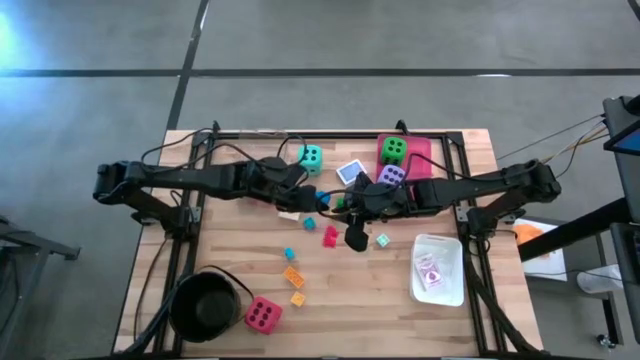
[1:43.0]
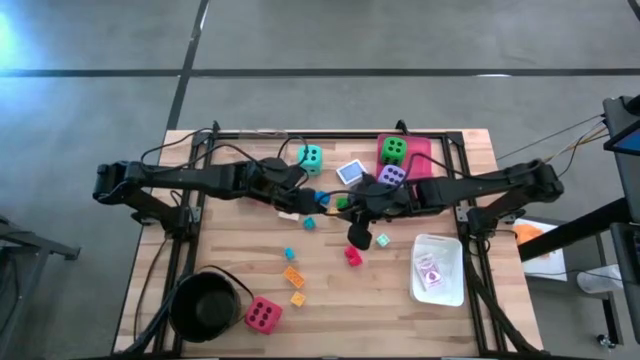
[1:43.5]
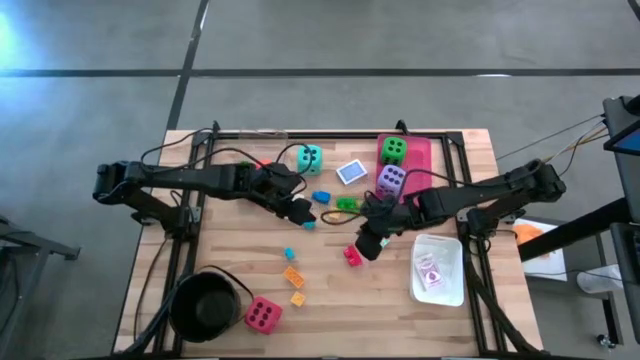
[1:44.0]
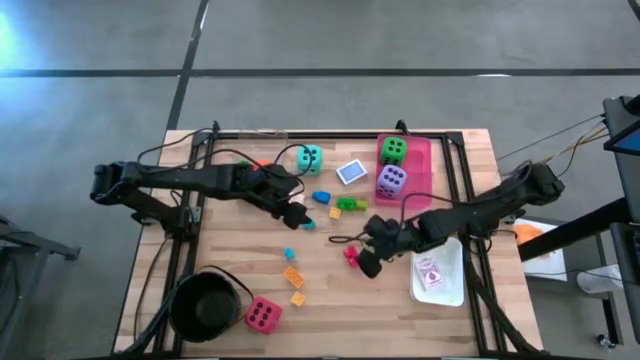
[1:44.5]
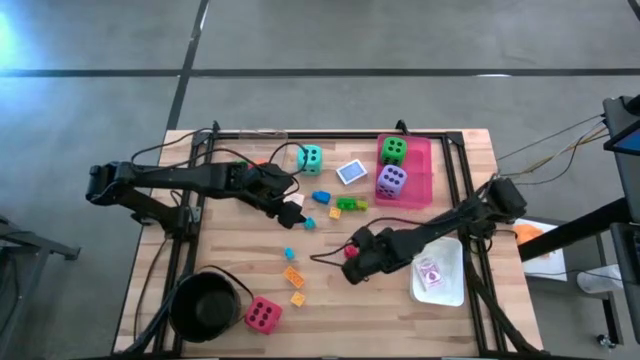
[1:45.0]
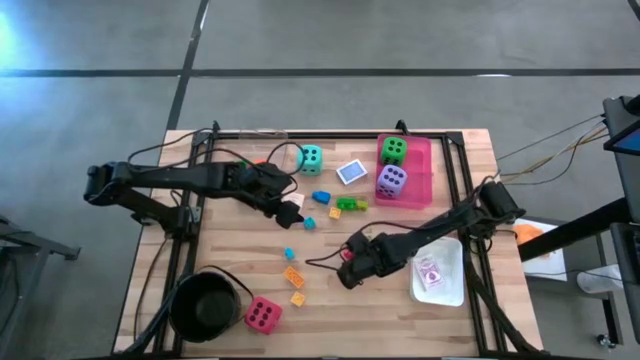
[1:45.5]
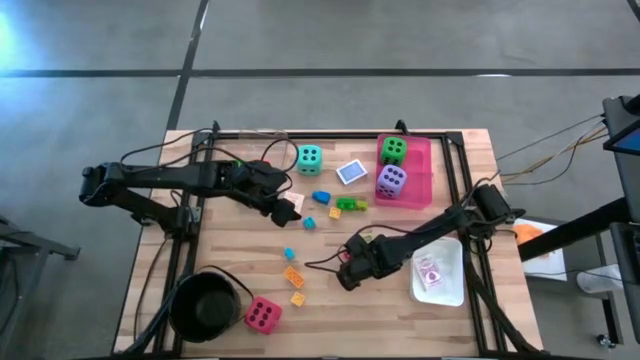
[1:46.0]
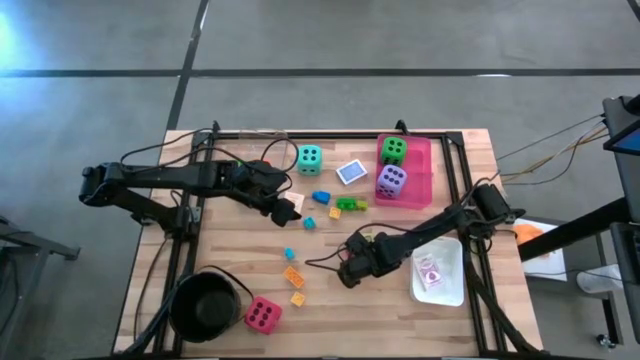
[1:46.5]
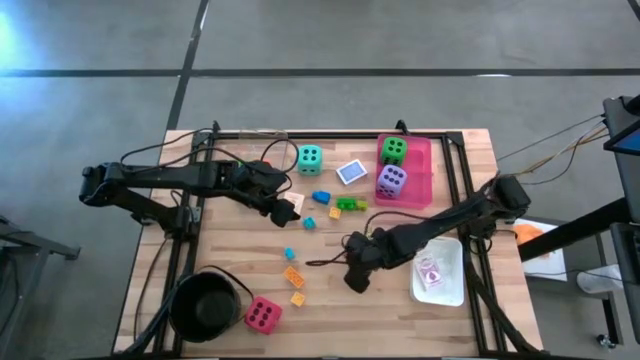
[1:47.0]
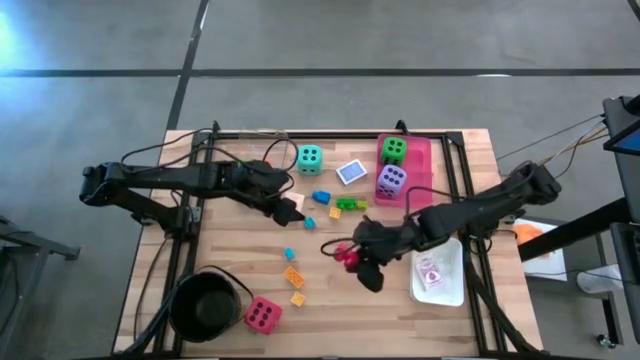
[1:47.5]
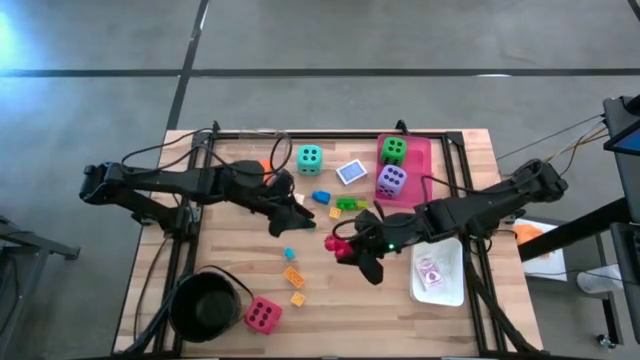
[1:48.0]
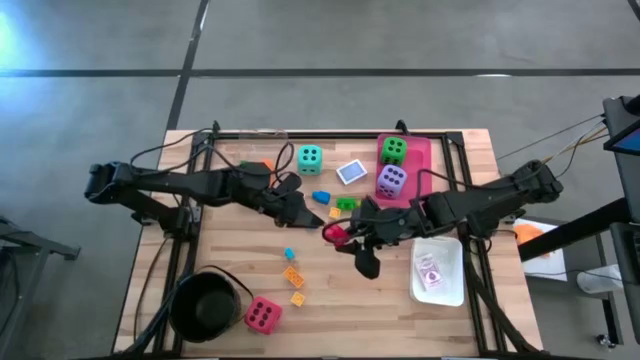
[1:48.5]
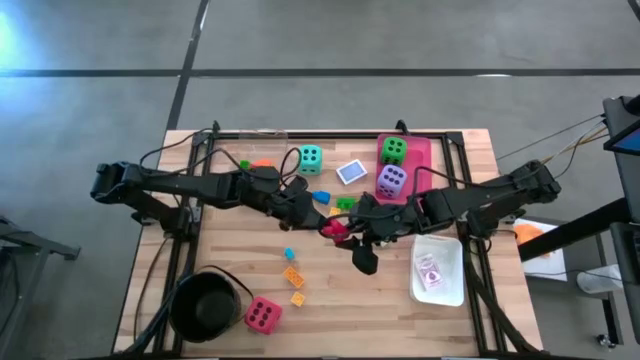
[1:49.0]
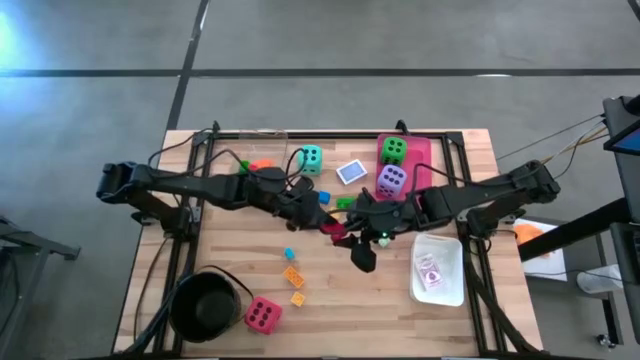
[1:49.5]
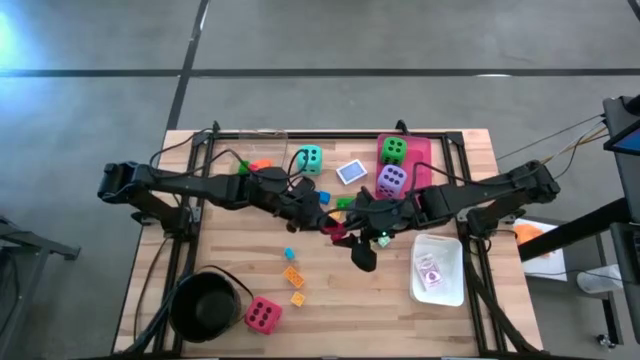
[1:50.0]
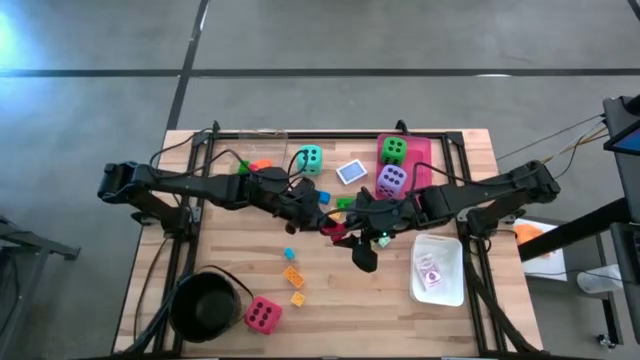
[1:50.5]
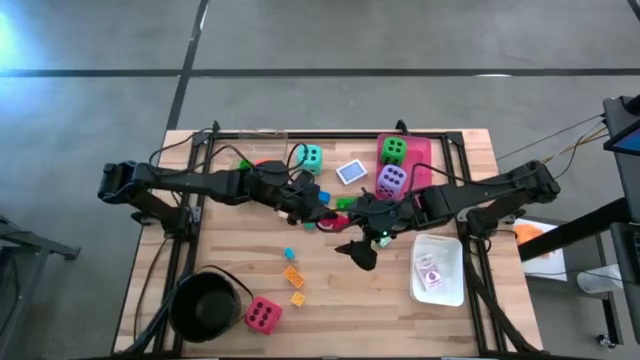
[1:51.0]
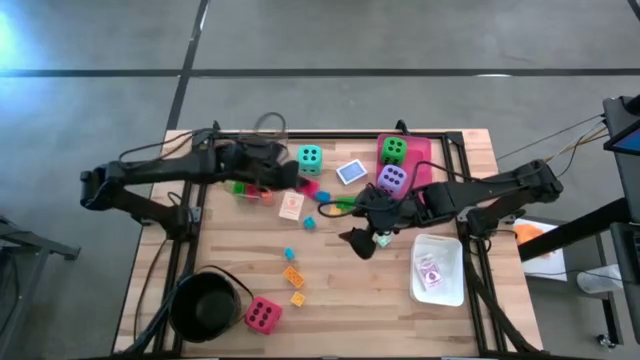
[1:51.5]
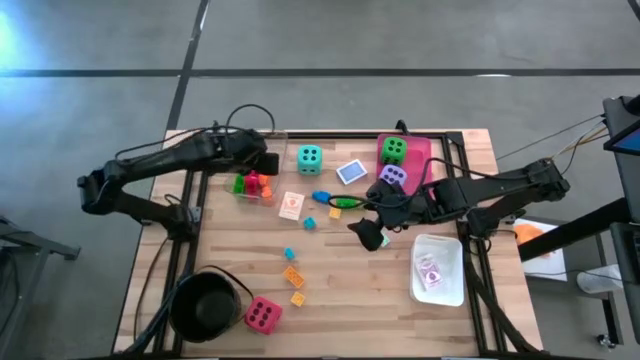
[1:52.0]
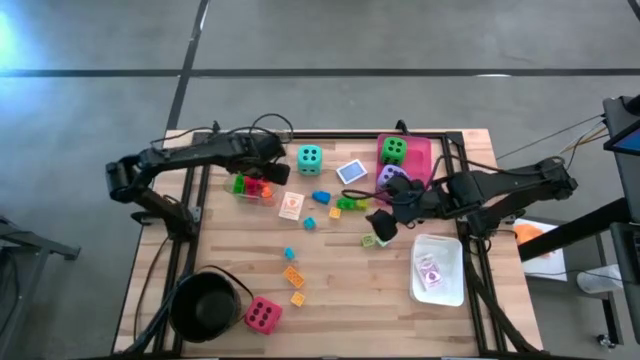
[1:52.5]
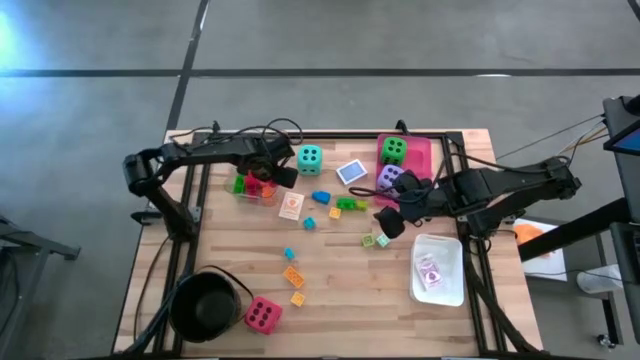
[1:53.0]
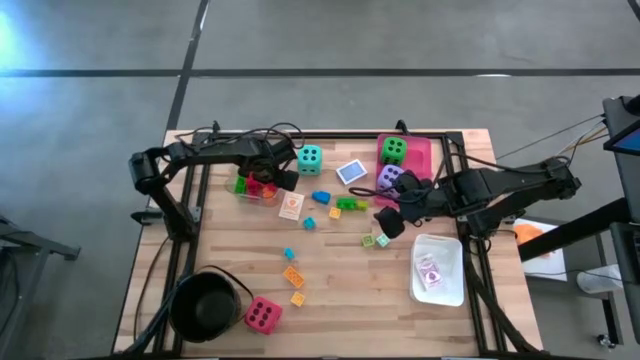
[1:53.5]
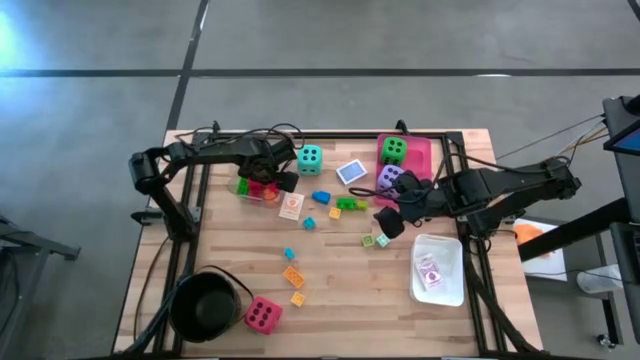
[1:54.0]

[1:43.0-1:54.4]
Task: Pick & Place Toys
Put the red game piece into the transparent bin

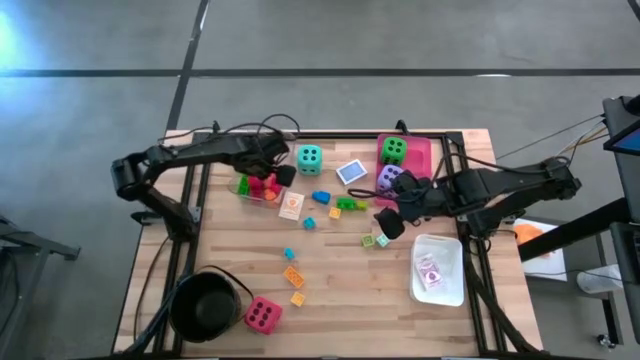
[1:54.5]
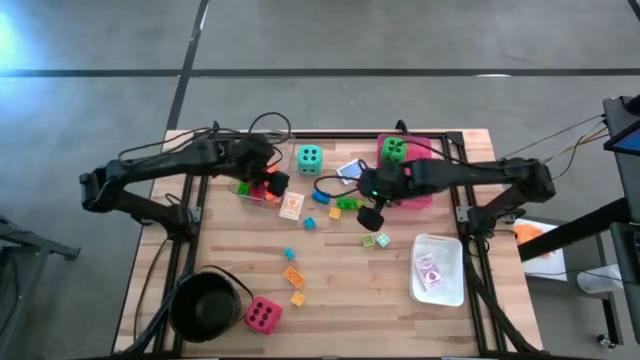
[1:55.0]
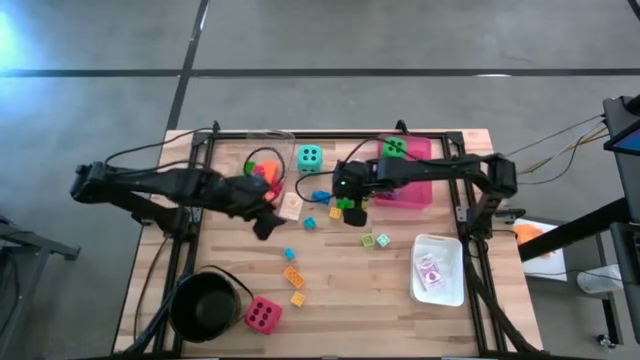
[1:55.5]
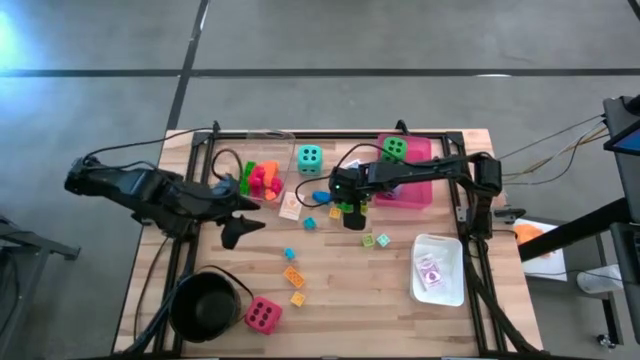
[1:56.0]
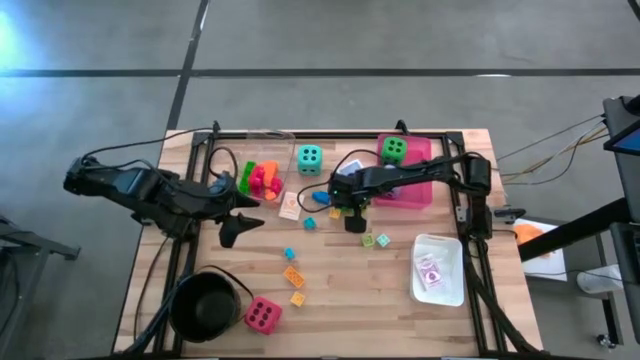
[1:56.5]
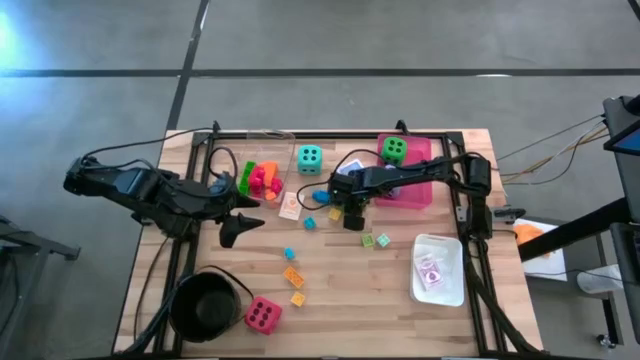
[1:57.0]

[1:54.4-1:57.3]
Put the green game piece into the transparent bin

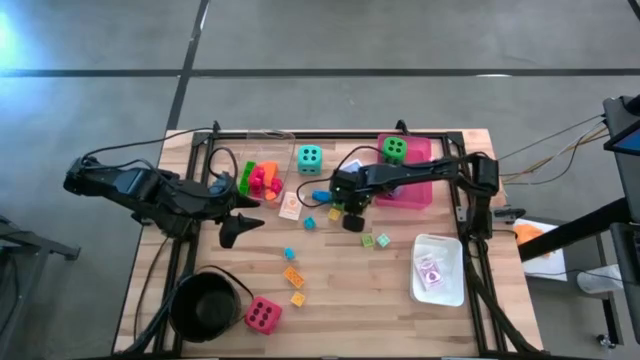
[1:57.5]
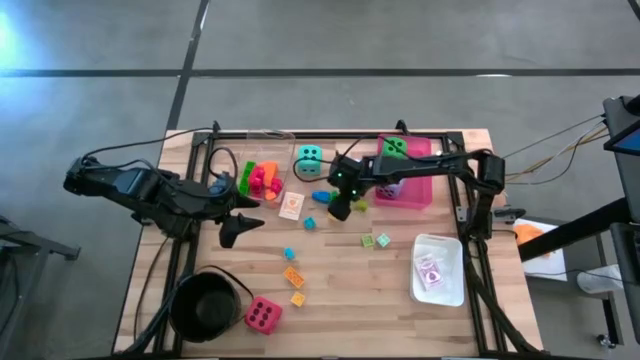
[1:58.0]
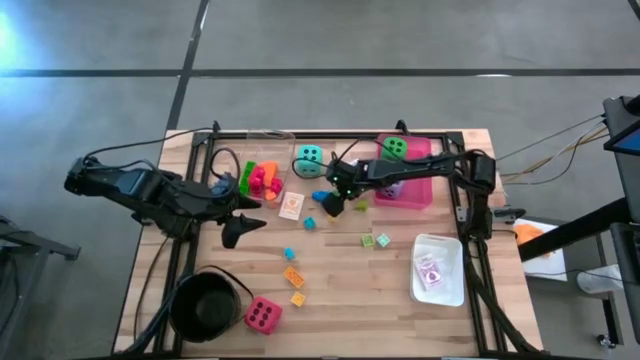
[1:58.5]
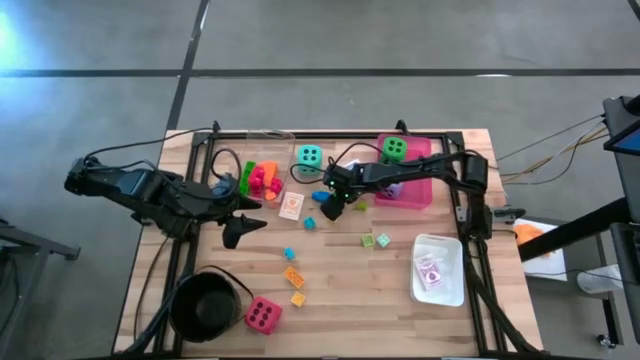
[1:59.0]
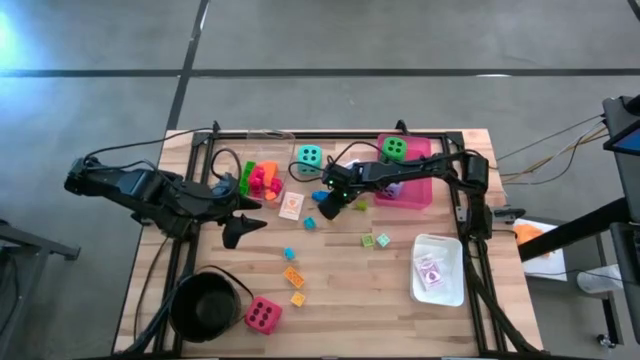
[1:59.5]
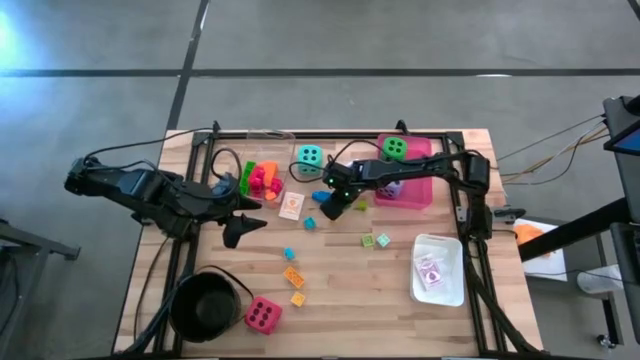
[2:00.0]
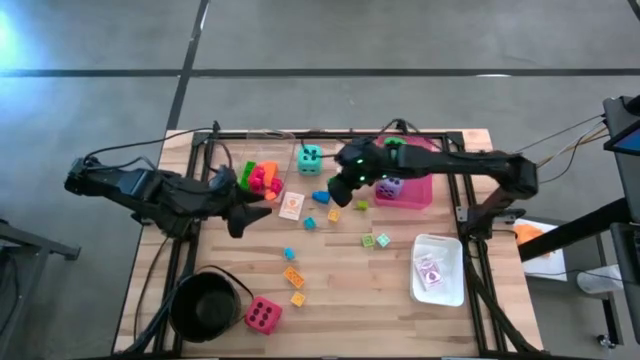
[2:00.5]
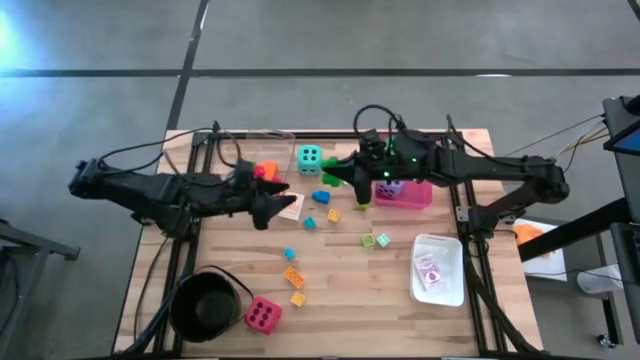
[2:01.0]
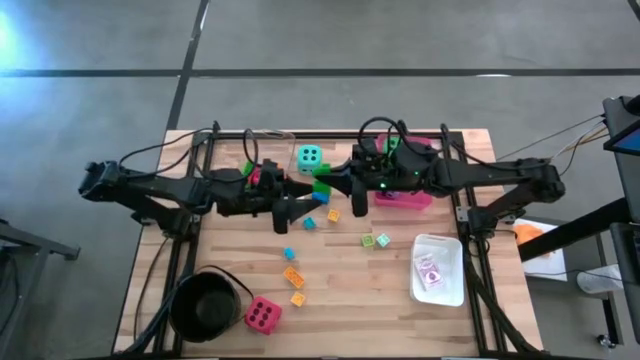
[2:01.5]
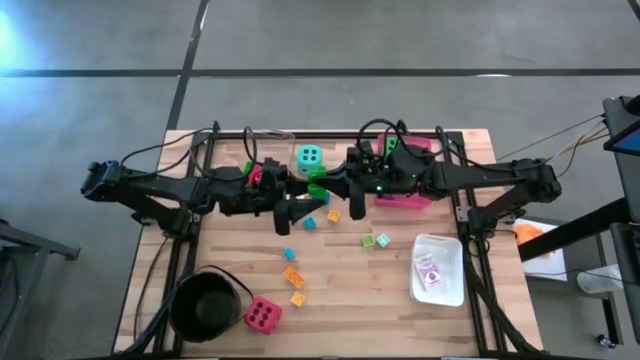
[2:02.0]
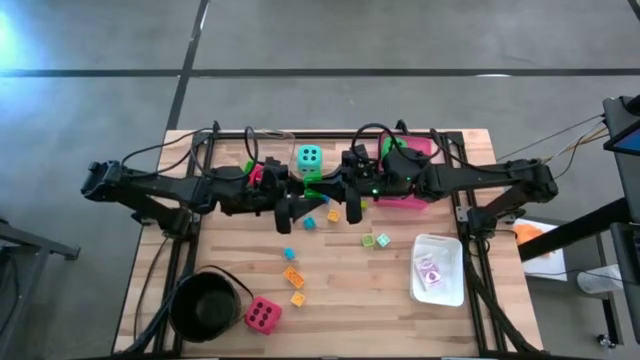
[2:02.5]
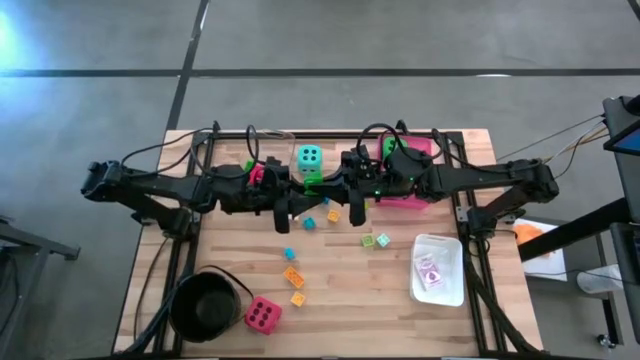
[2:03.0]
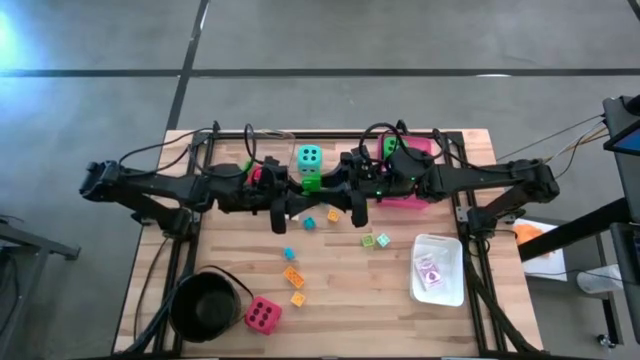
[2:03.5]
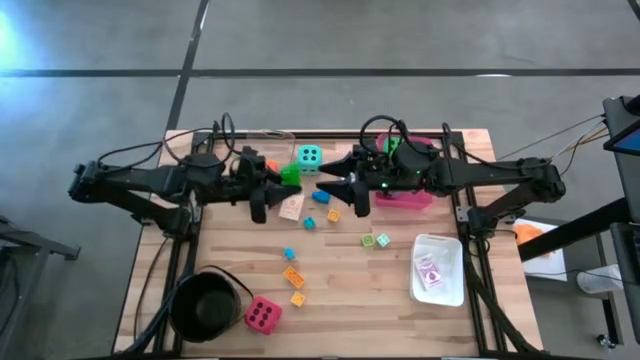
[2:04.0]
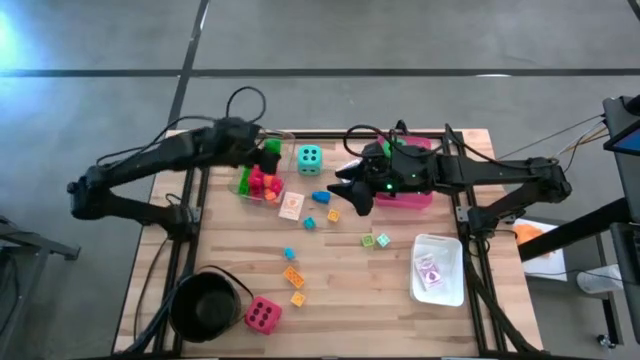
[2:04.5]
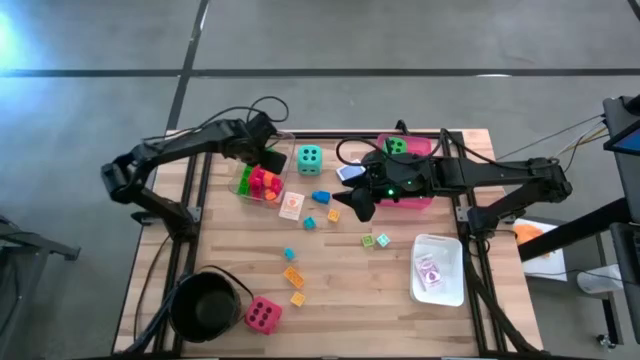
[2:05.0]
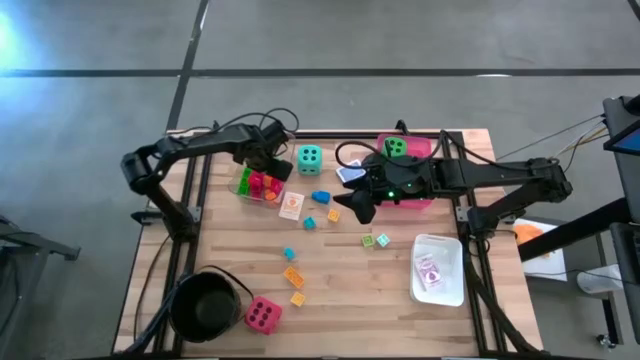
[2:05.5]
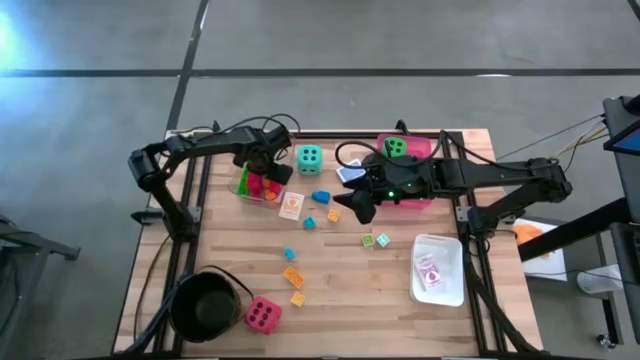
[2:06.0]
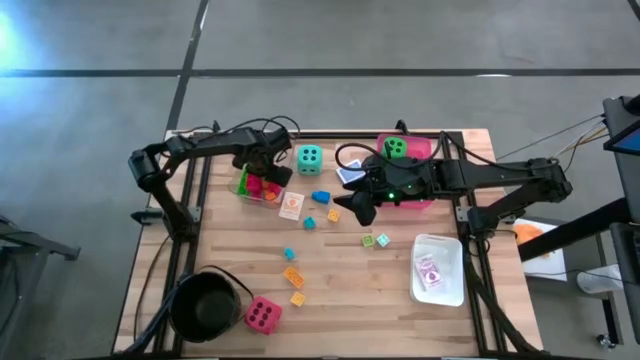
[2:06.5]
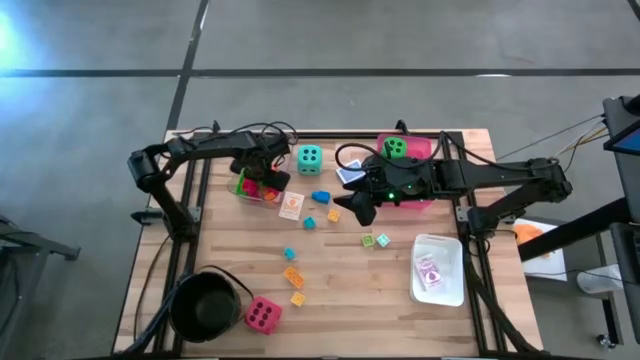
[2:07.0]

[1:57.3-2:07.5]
Put the green game piece into the transparent bin
